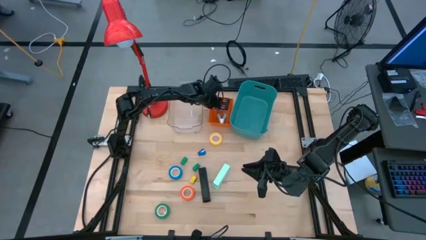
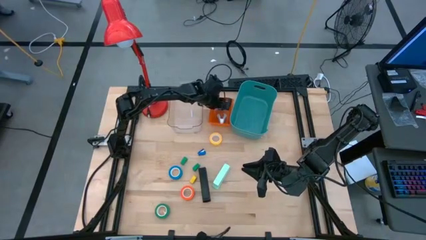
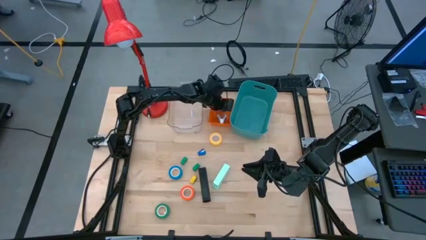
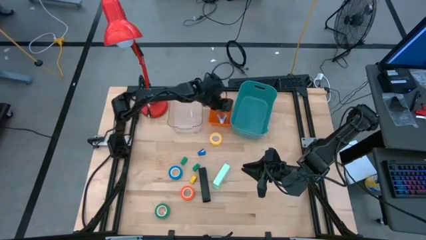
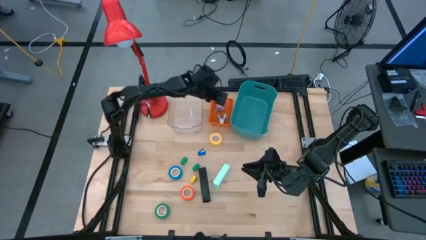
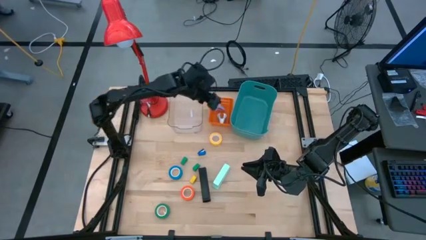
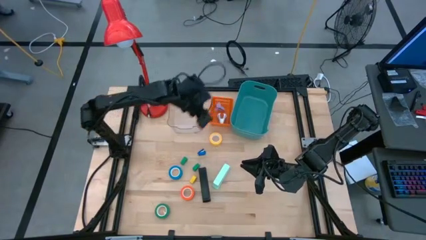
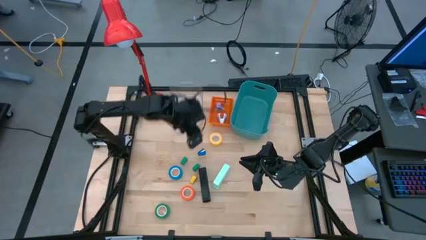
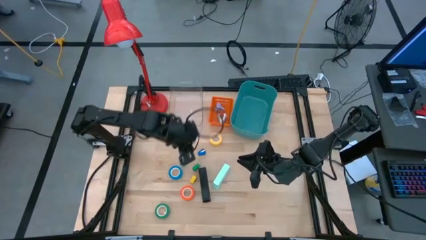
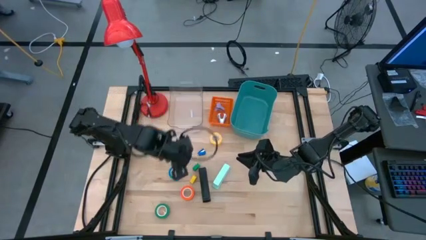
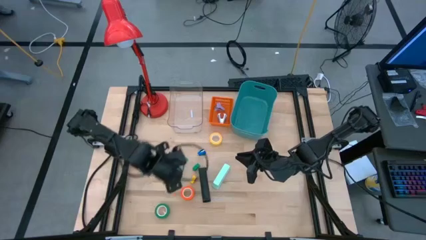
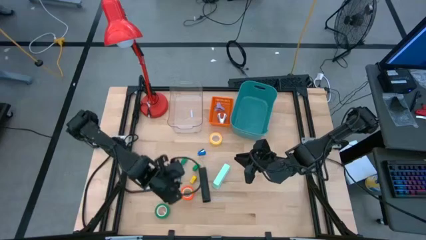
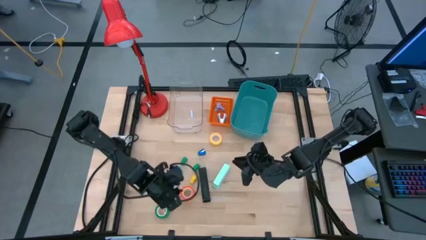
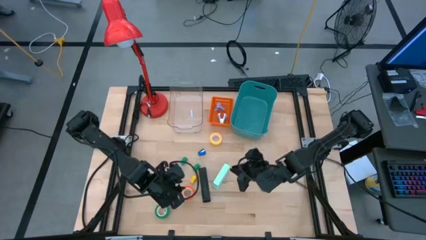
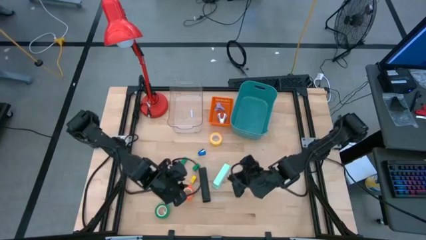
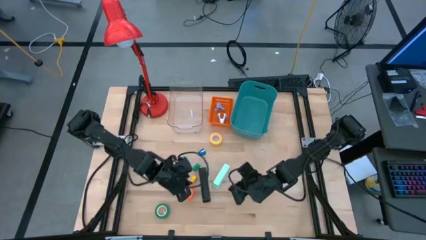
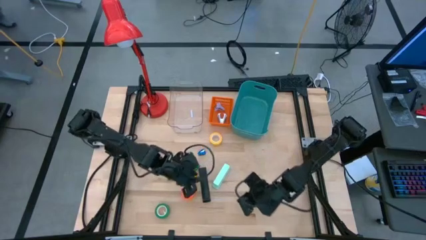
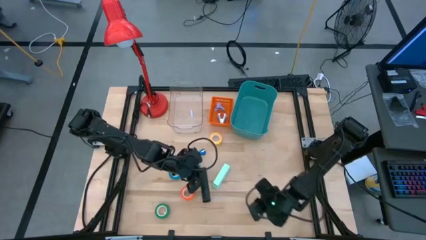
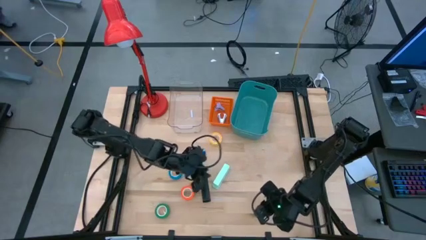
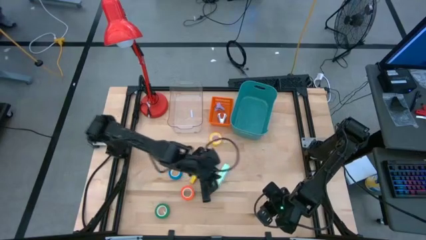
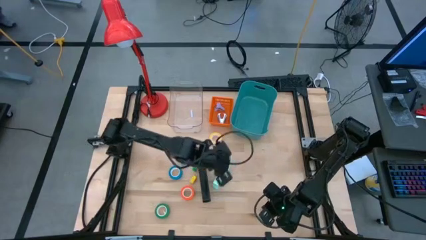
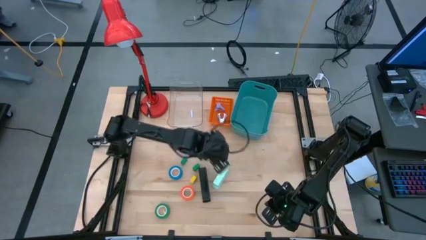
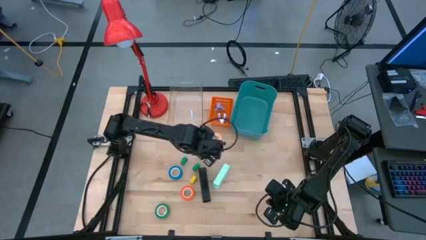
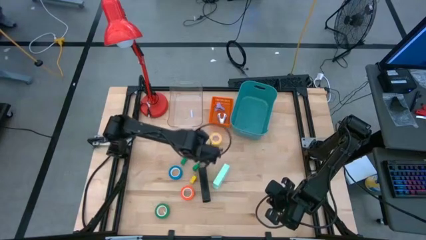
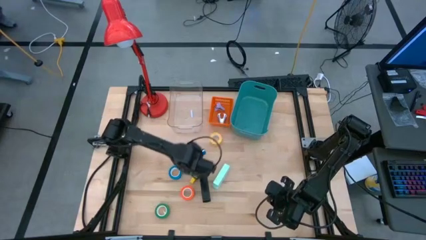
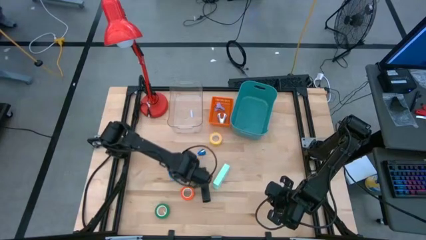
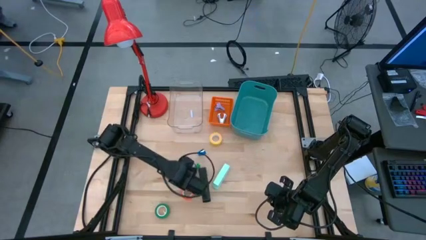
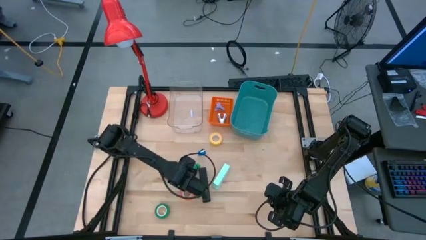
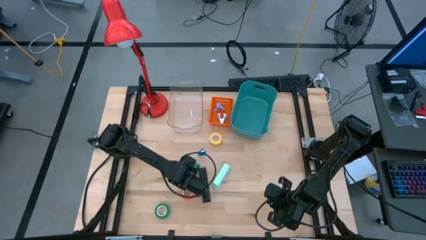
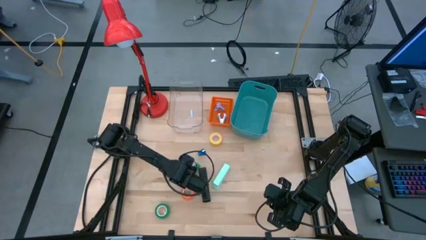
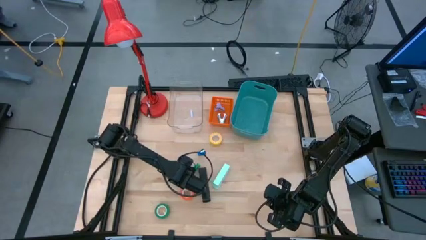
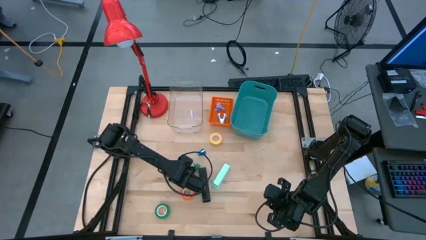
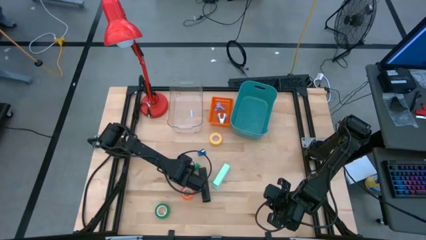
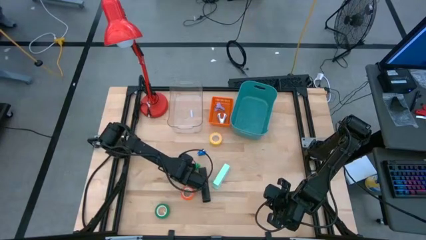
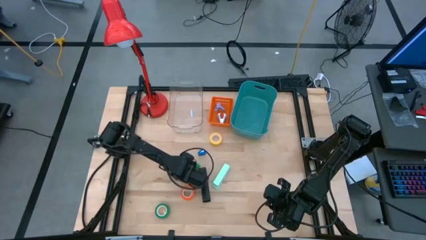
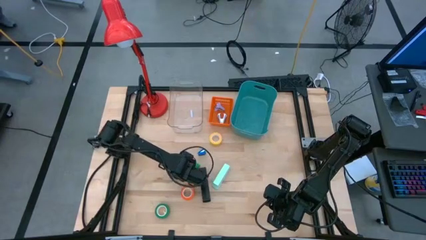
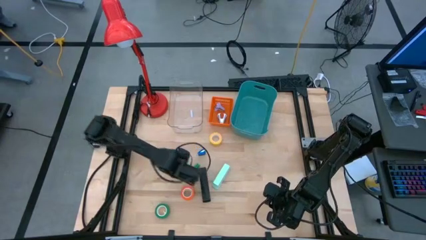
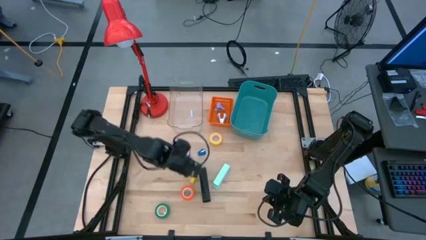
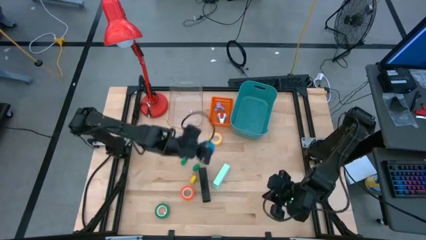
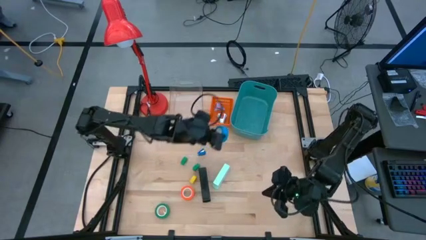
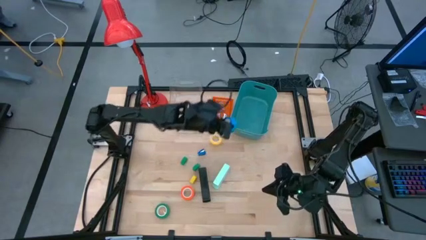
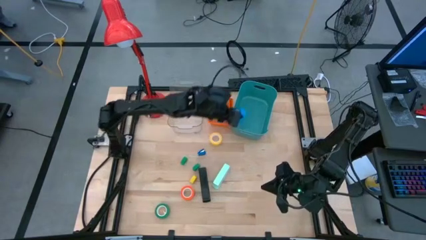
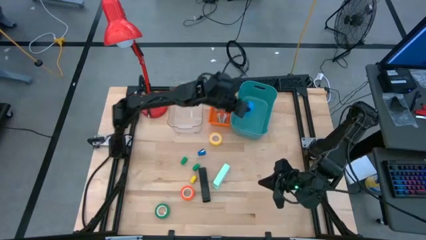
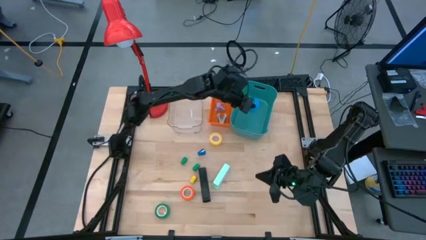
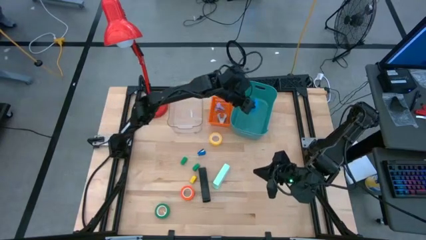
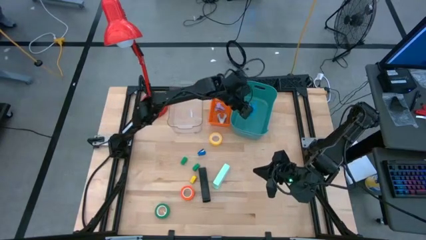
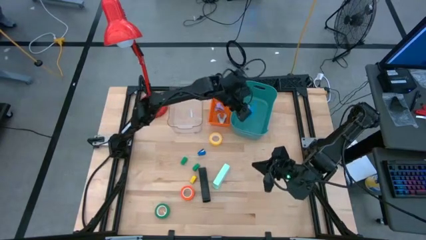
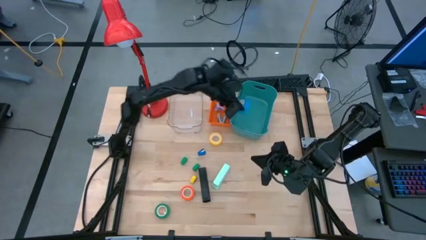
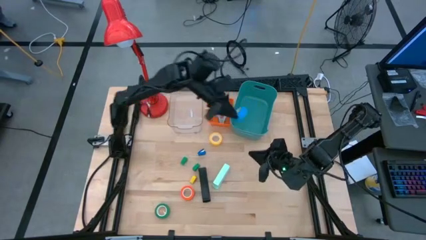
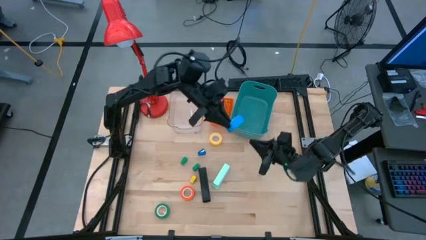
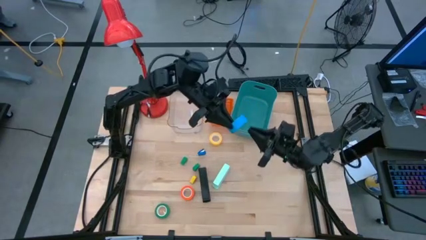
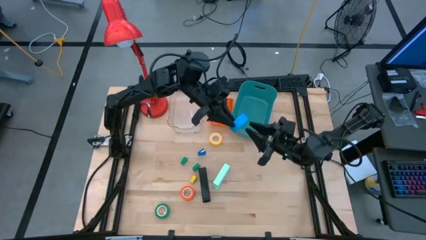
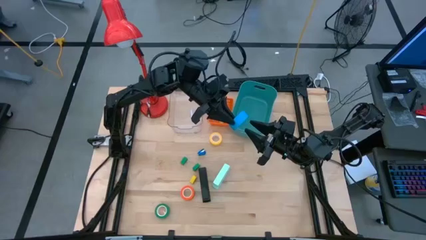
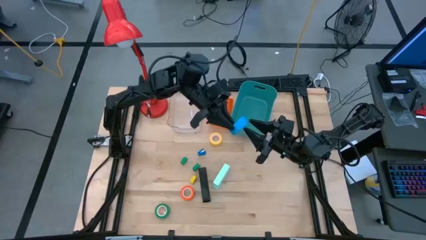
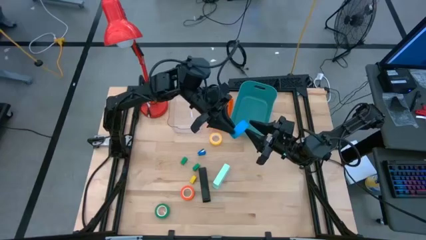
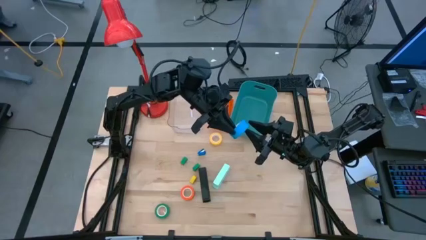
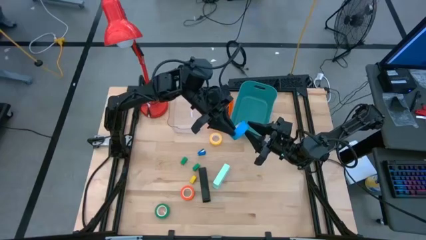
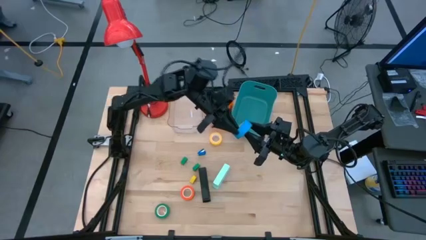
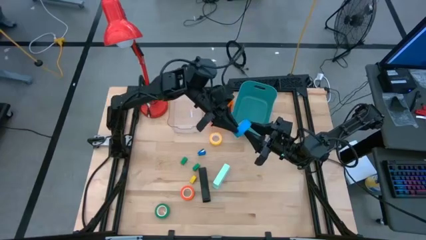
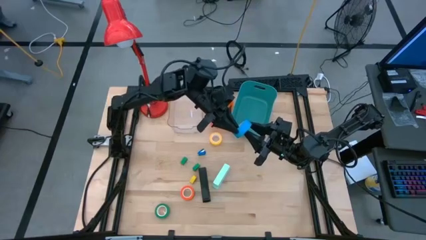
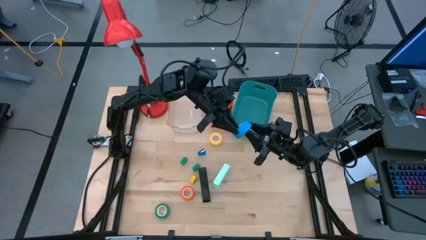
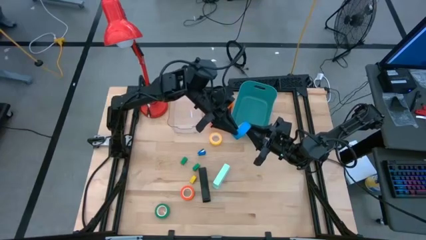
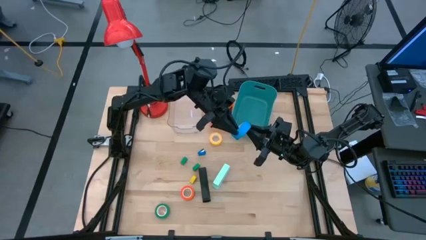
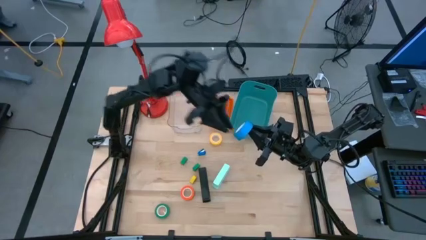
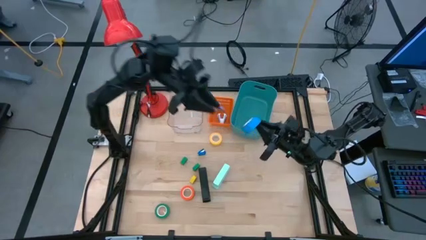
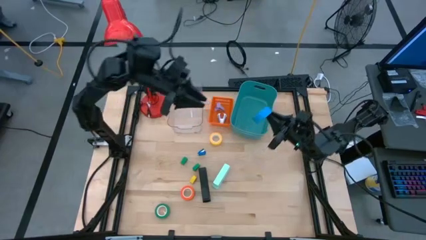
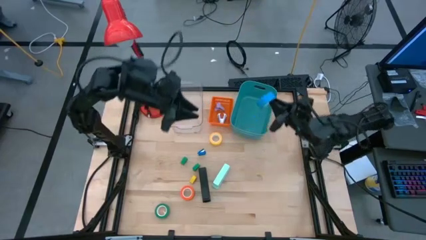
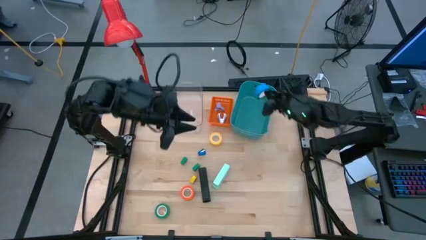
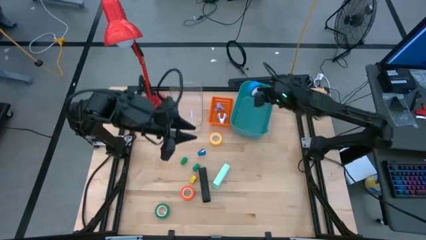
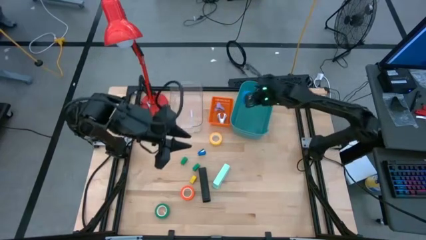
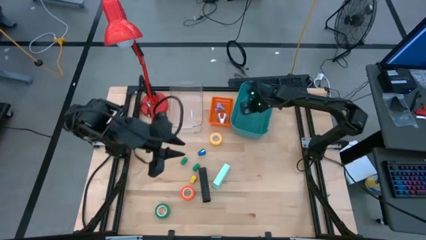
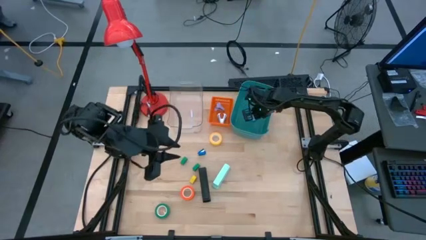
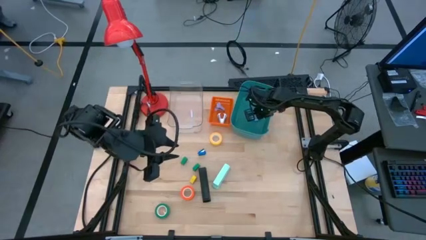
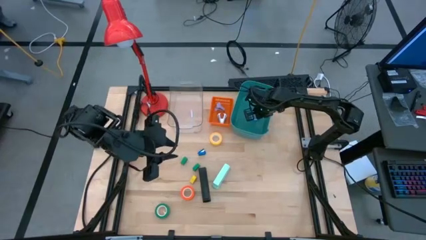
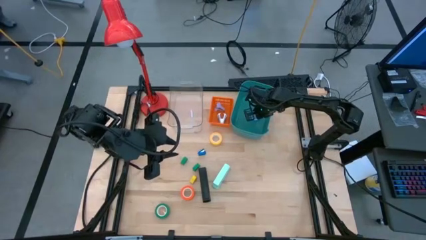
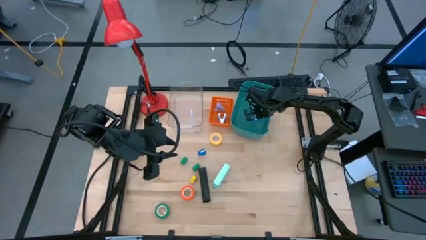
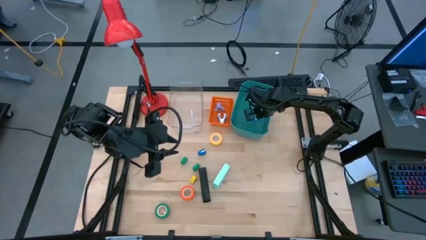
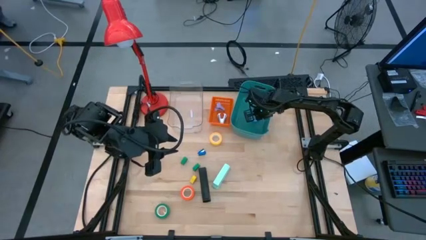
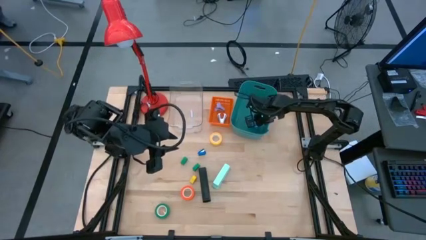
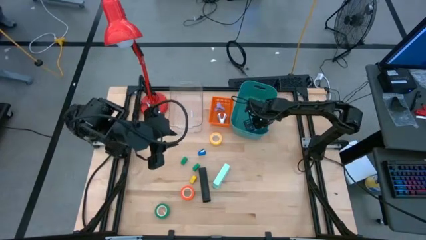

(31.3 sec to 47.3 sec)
Task: Pick and place Stapler, Stapler remover, tape
Put the blue tape into the green bin
